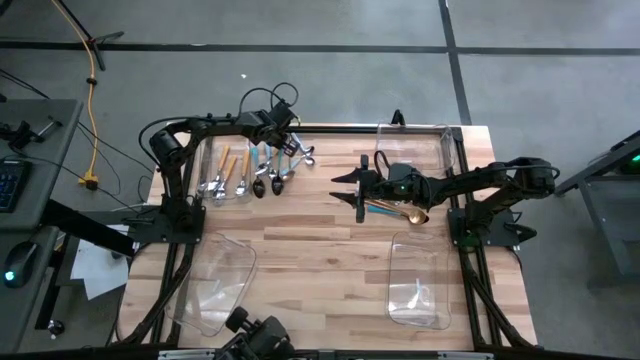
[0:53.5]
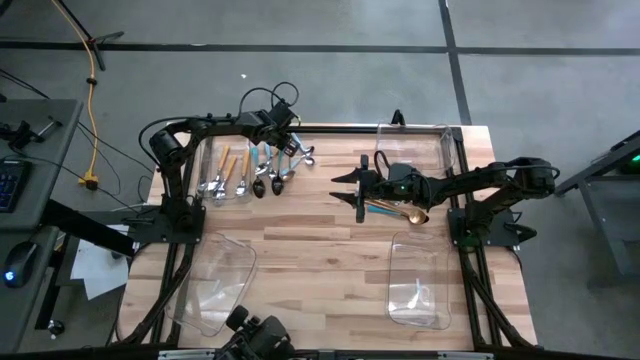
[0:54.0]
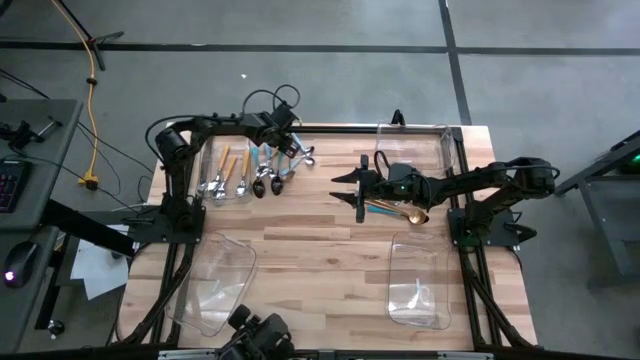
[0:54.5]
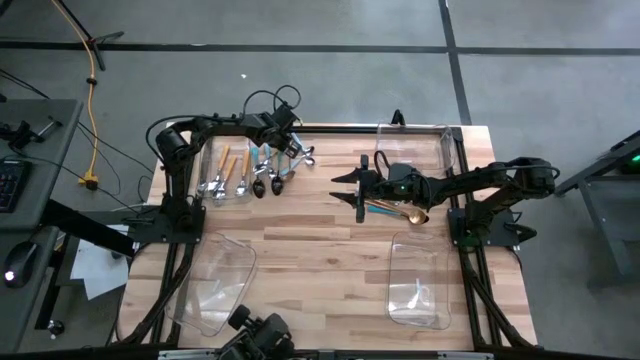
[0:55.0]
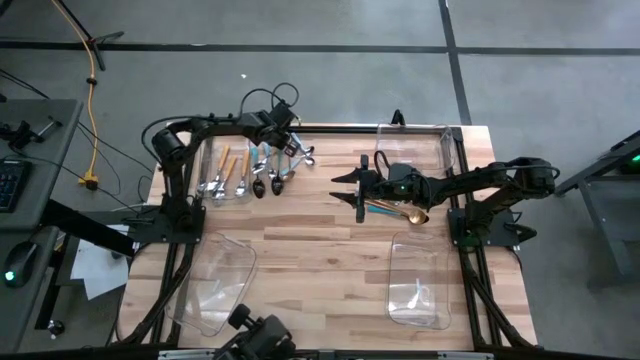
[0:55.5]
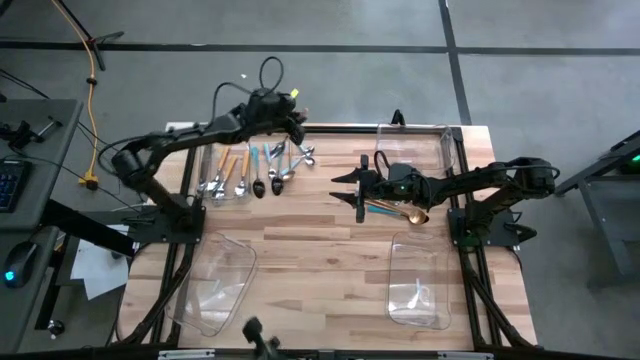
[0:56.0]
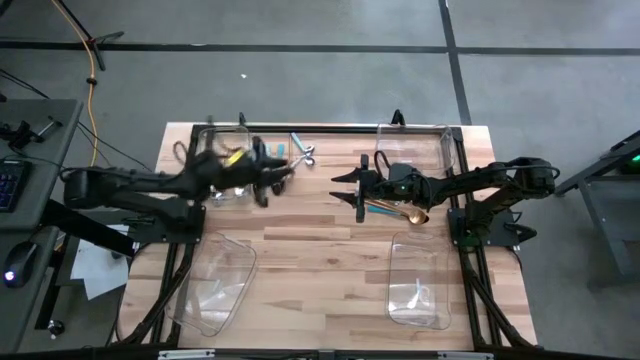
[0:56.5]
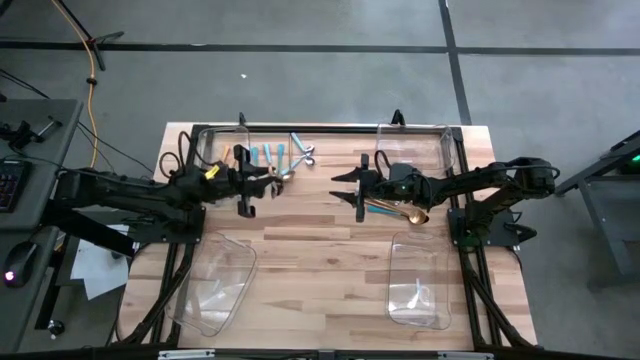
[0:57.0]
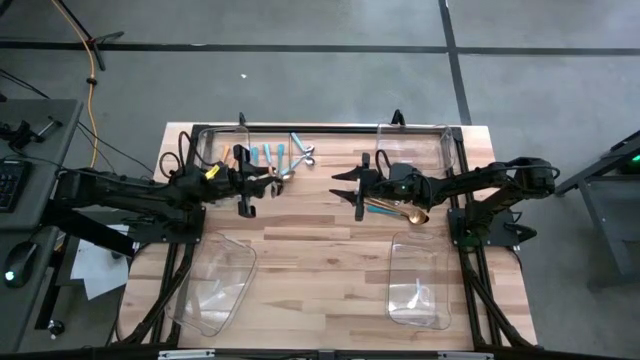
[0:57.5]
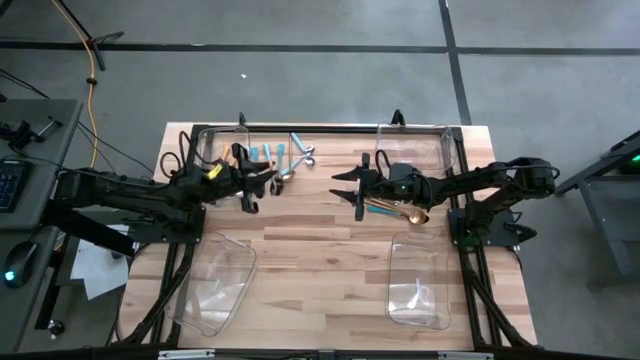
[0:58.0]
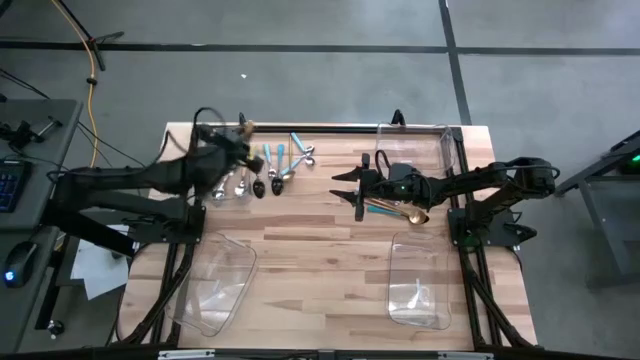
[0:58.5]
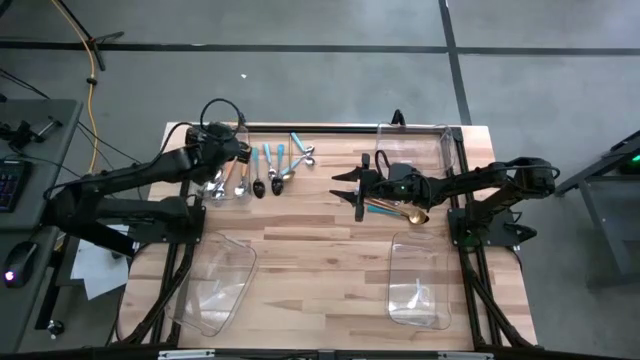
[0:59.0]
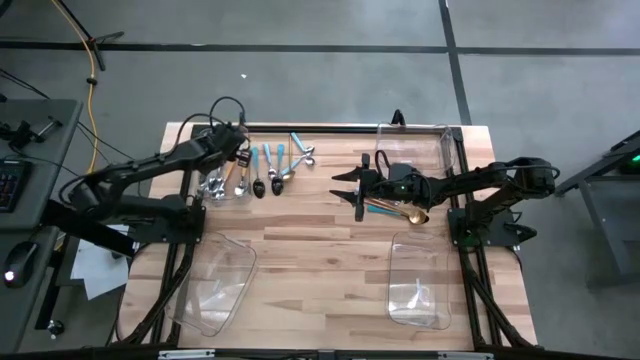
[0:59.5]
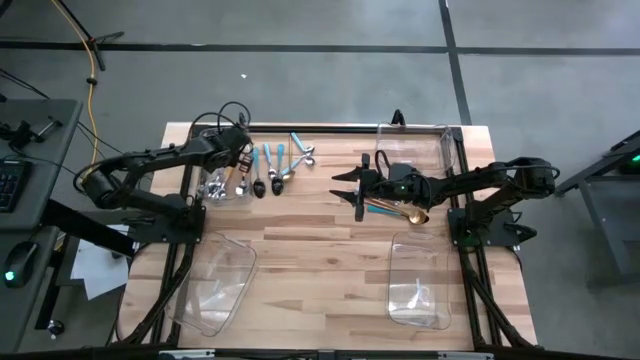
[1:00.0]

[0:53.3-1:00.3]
Task: Sort silverware by color (type)
Put the yellow spoon into the top left transparent bin

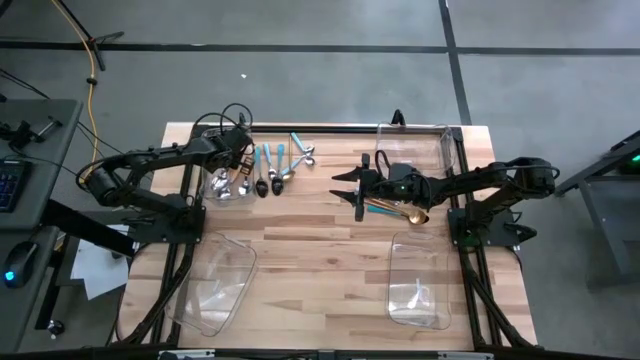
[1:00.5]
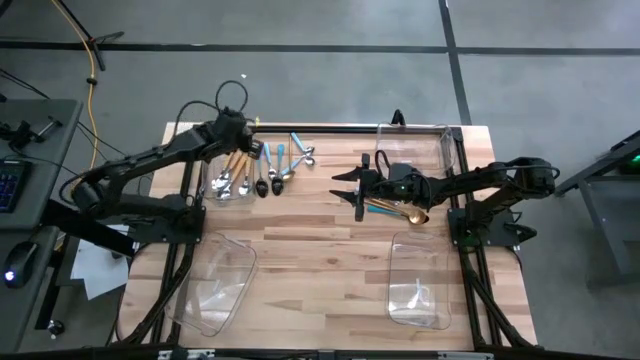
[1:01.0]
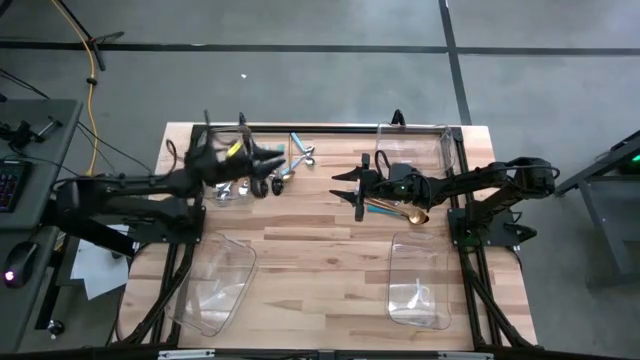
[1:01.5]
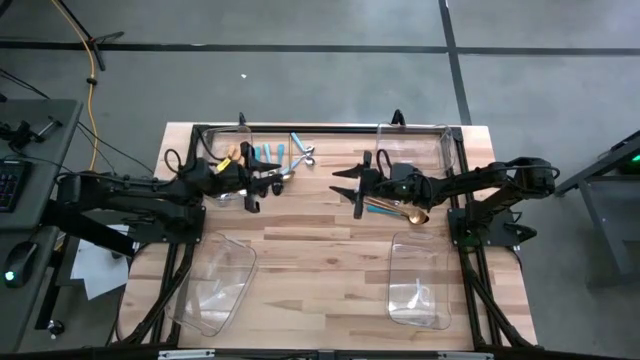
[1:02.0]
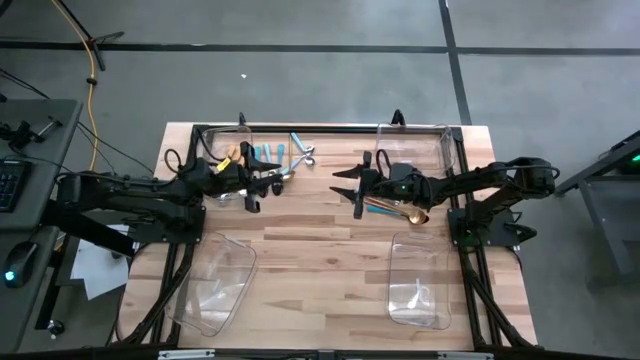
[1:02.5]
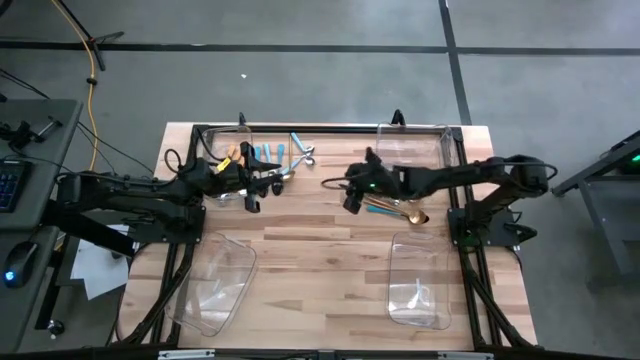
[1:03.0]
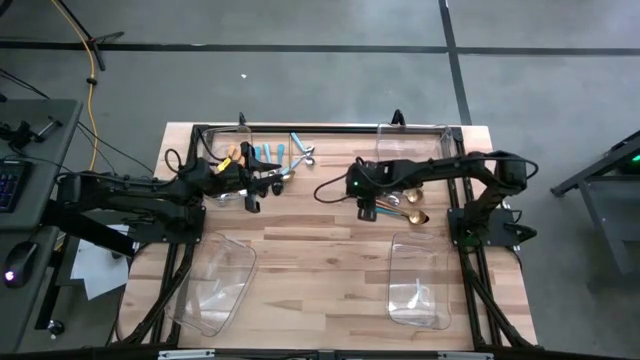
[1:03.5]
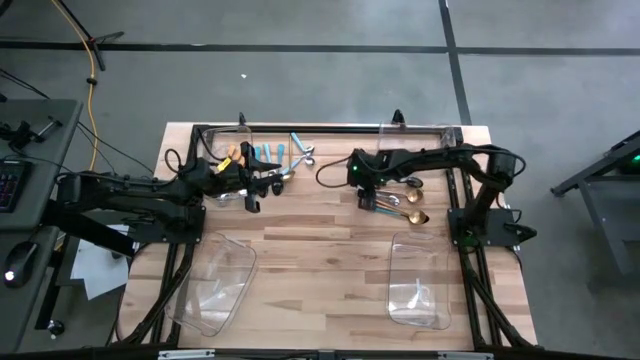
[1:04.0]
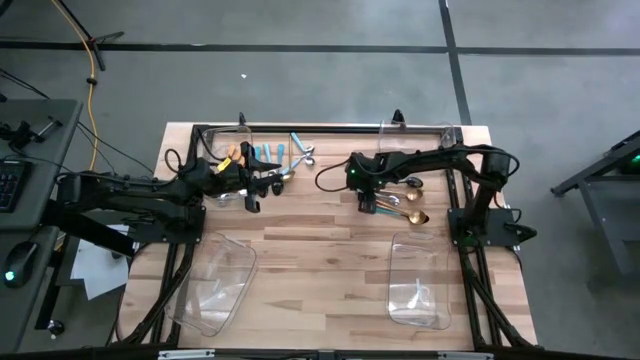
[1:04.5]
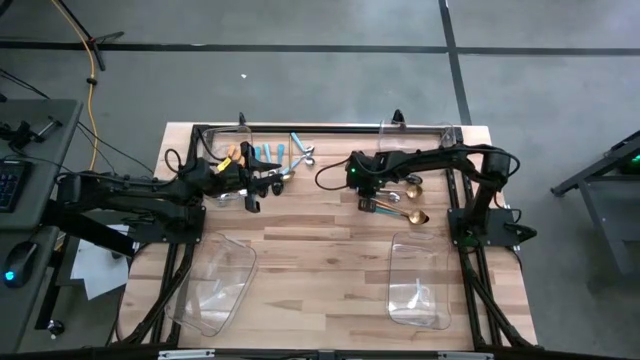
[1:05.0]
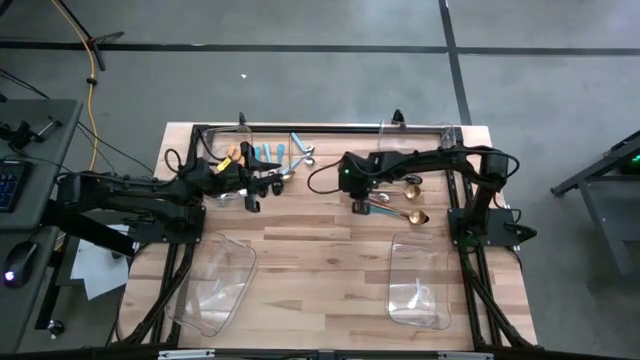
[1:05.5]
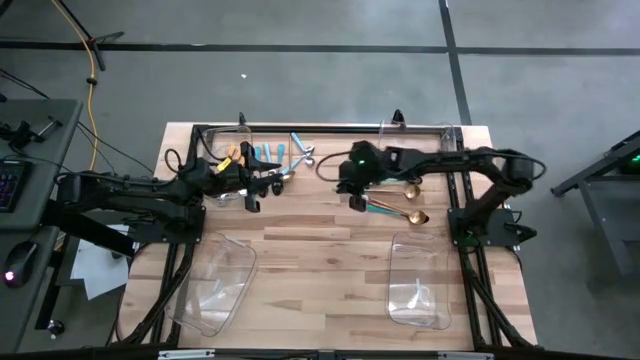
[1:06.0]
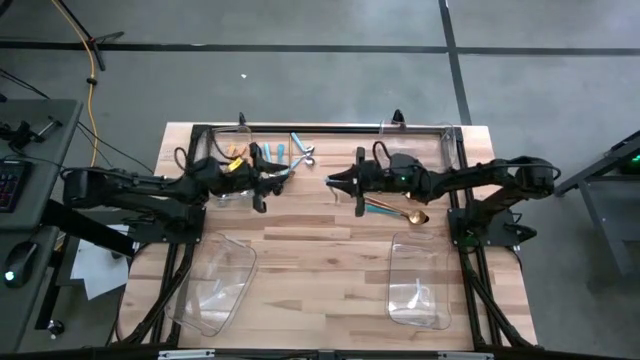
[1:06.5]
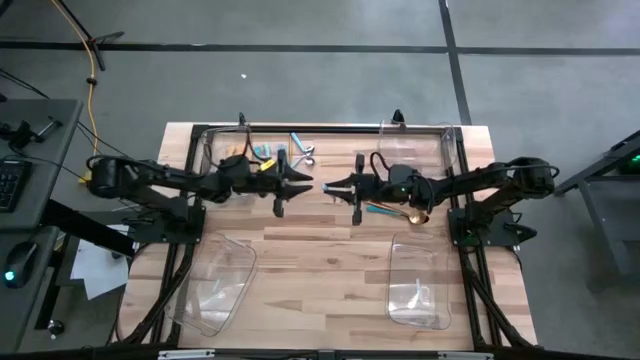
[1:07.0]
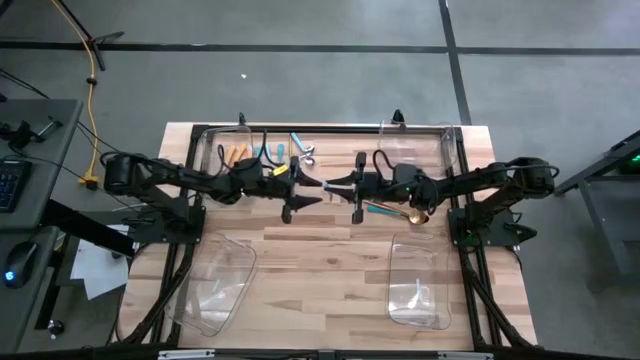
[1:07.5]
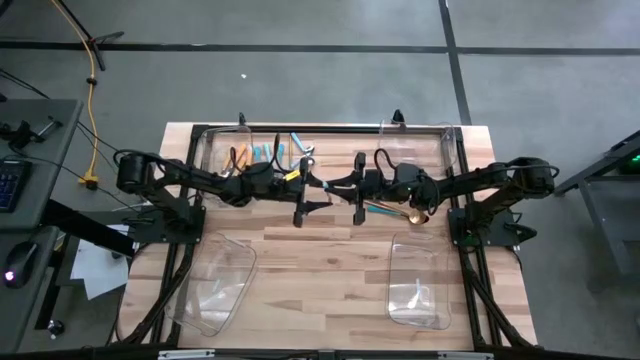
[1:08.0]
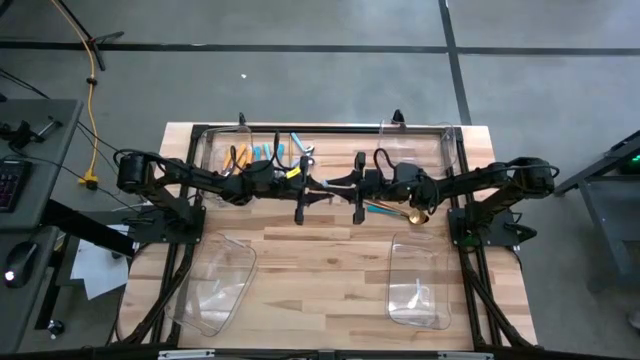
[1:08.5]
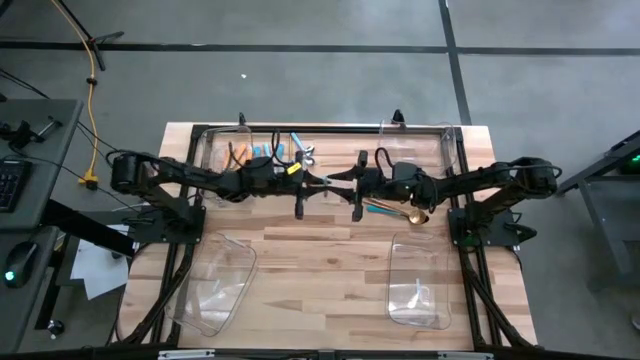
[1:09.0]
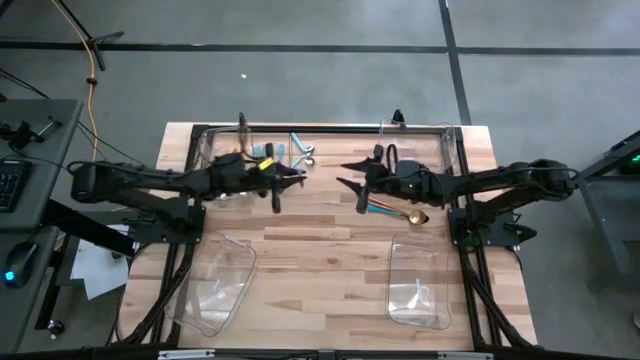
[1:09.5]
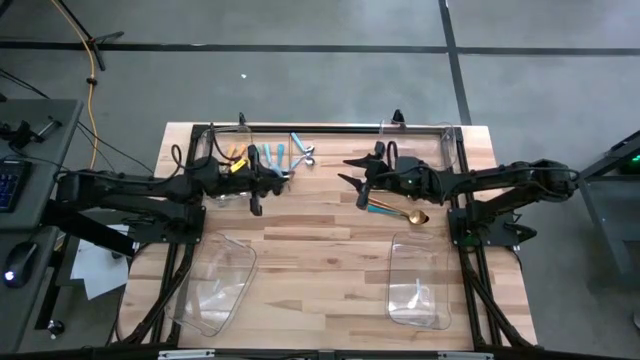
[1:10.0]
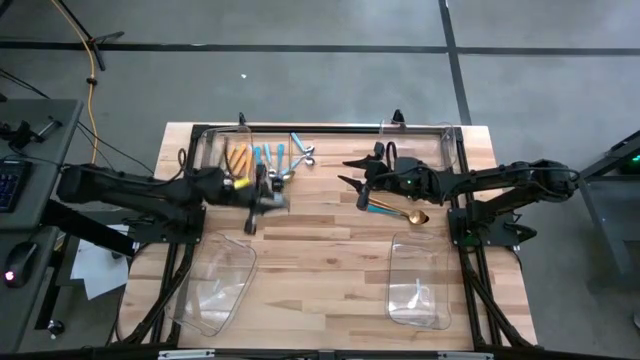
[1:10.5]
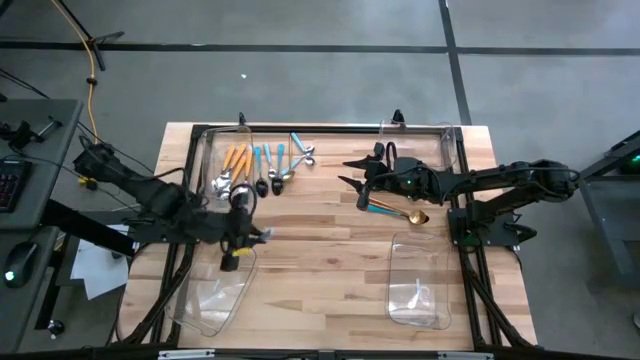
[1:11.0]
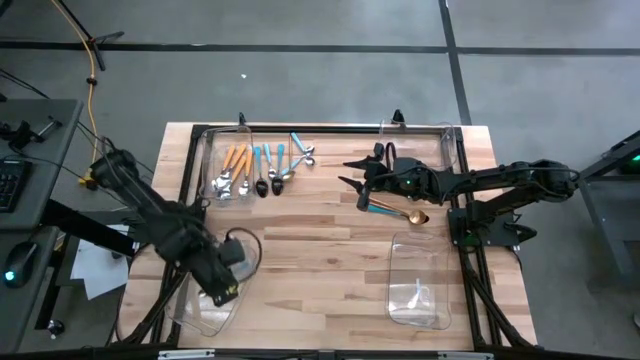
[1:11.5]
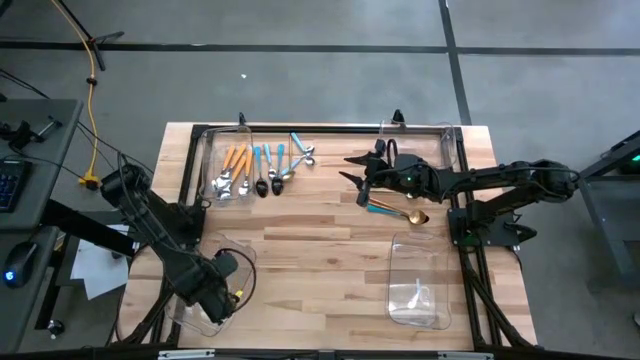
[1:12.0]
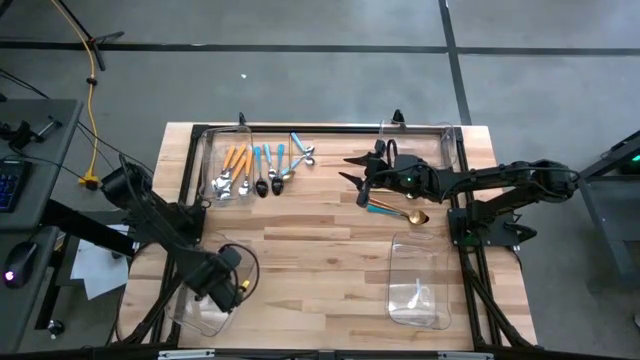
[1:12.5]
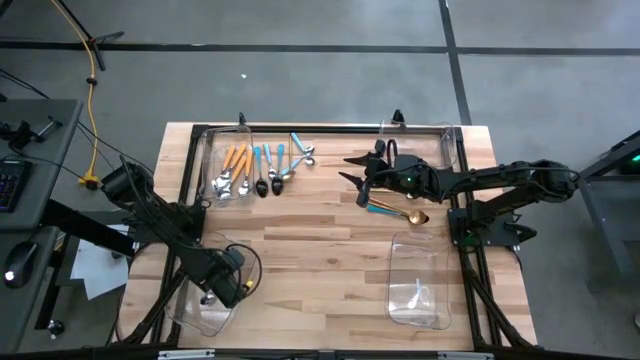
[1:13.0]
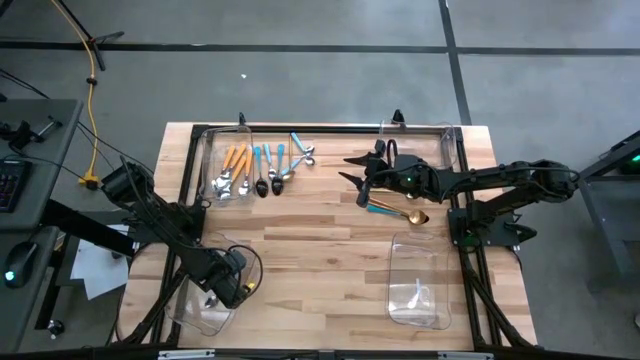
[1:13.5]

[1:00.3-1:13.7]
Put the light blue spoon into the bottom left transparent bin

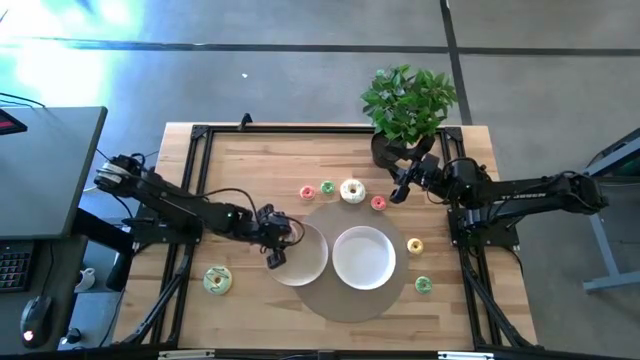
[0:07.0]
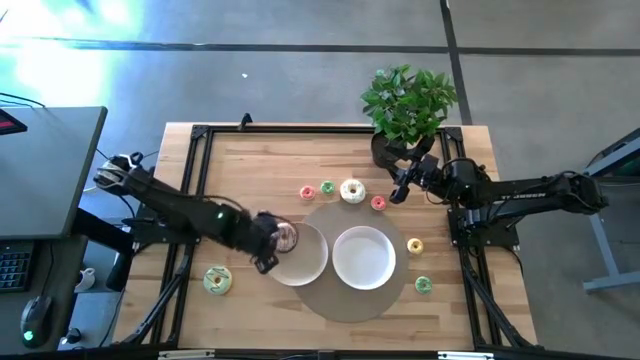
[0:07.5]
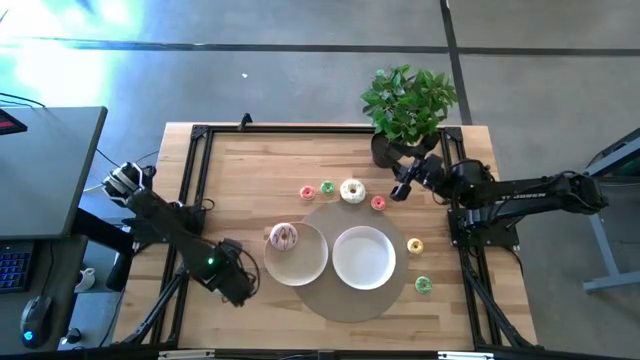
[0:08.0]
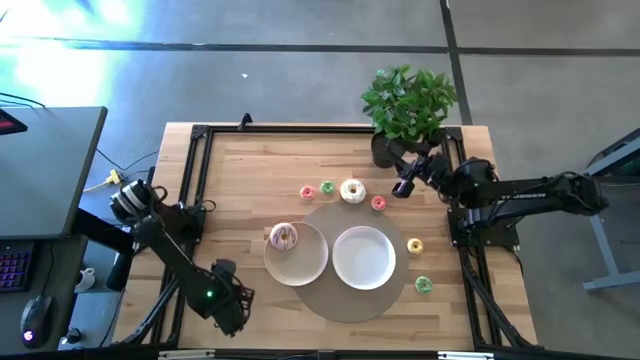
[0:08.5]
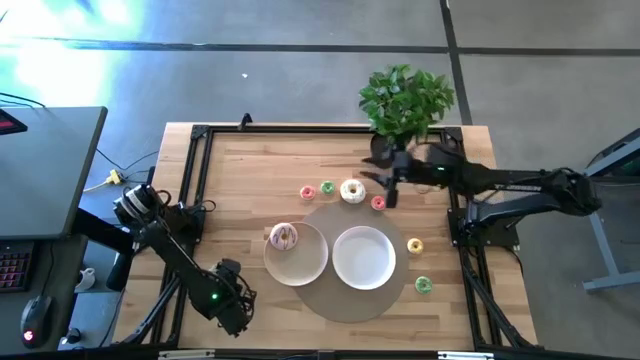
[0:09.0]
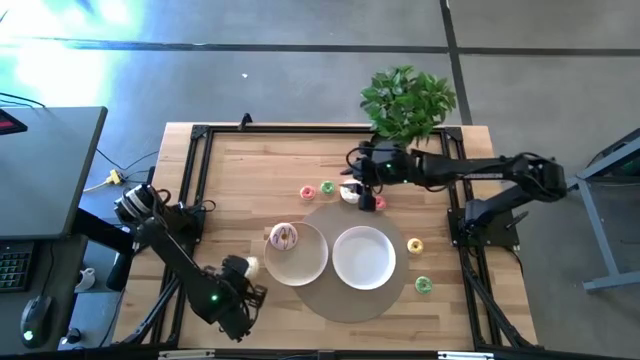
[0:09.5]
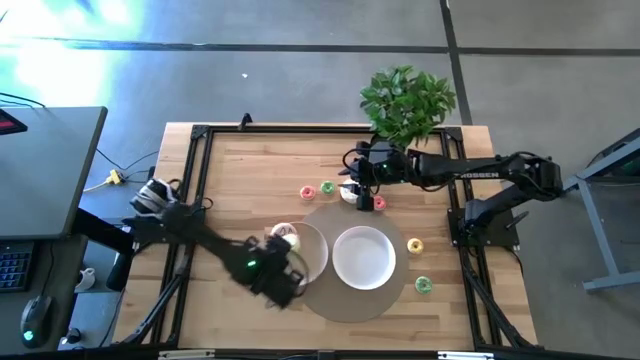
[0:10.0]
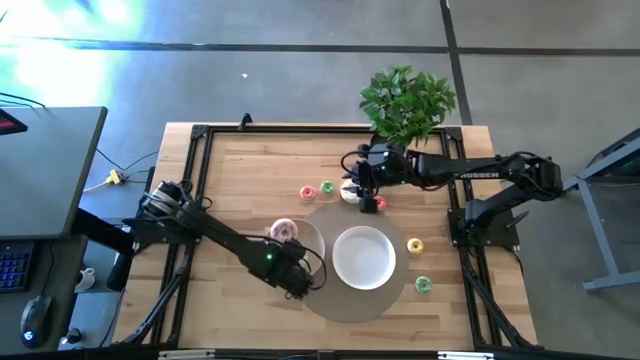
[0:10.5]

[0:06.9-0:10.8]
Task: Pick & Place donuts
Put the large blue donut on the brown plate
